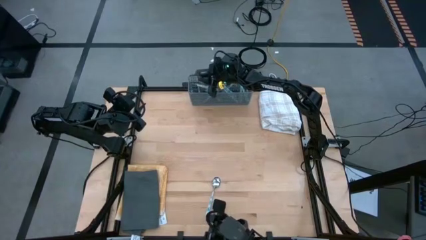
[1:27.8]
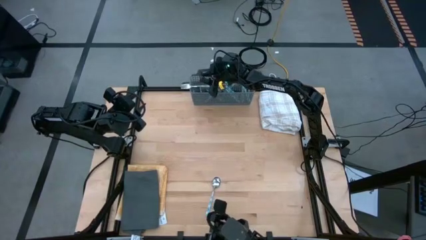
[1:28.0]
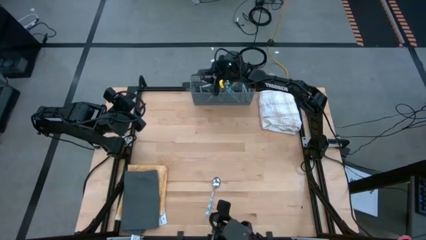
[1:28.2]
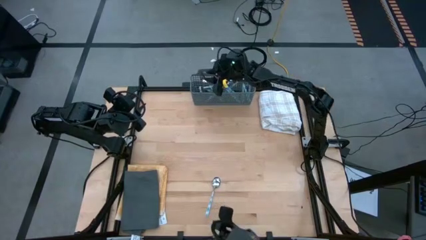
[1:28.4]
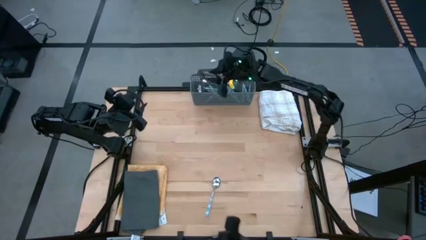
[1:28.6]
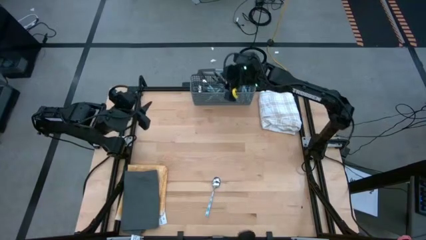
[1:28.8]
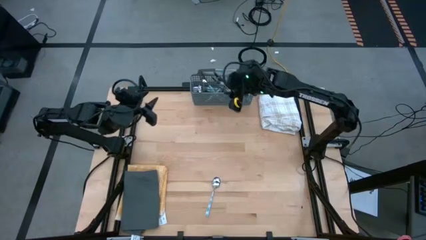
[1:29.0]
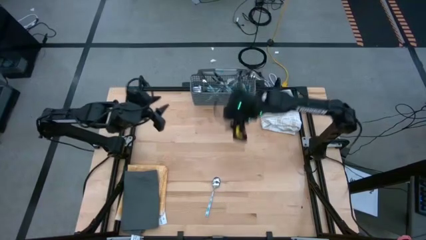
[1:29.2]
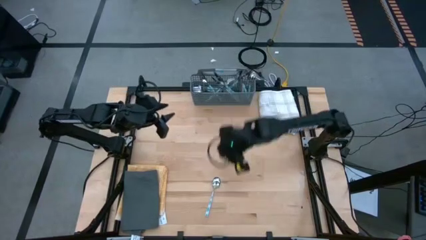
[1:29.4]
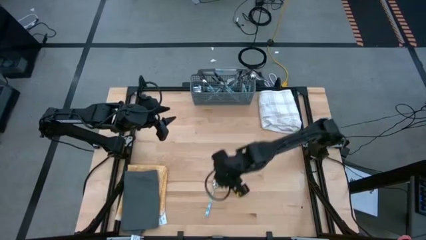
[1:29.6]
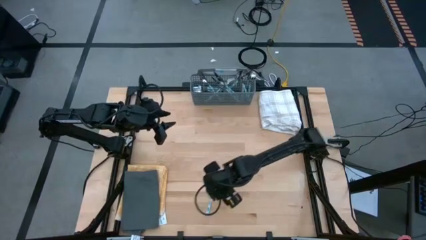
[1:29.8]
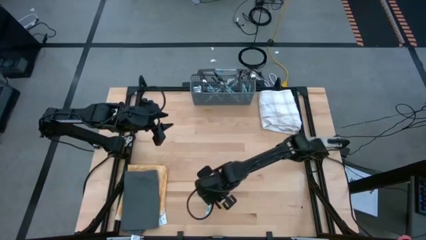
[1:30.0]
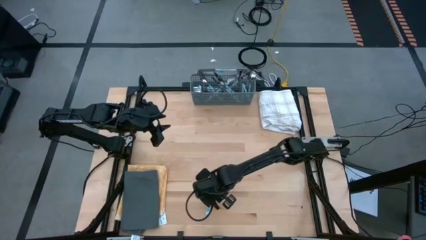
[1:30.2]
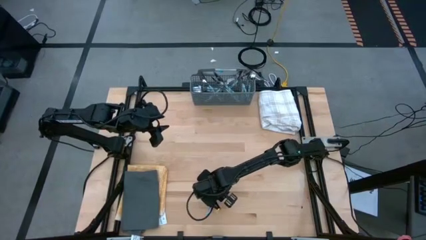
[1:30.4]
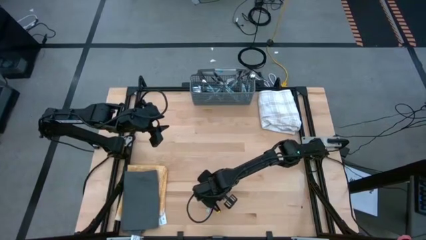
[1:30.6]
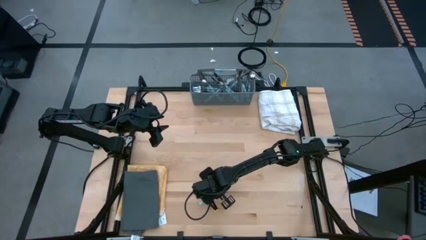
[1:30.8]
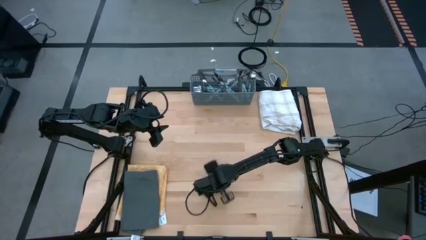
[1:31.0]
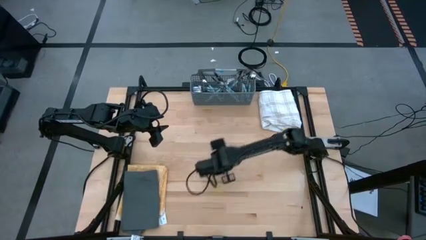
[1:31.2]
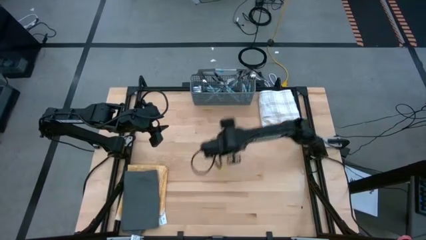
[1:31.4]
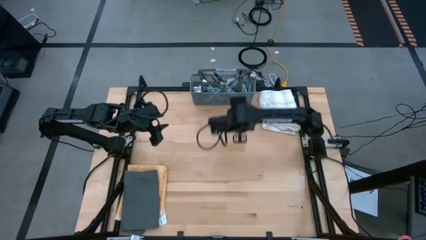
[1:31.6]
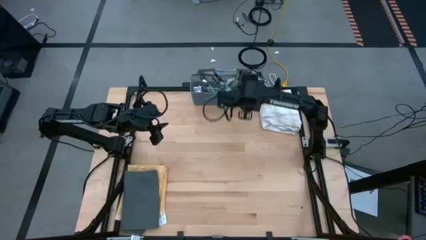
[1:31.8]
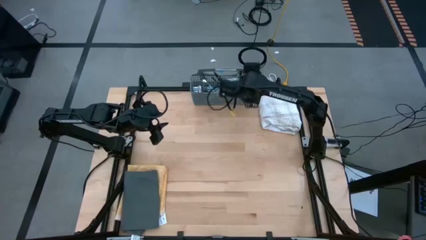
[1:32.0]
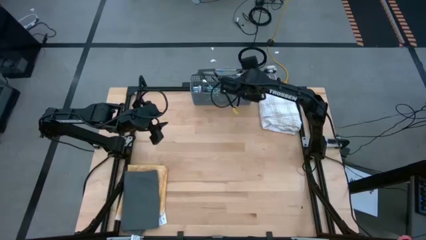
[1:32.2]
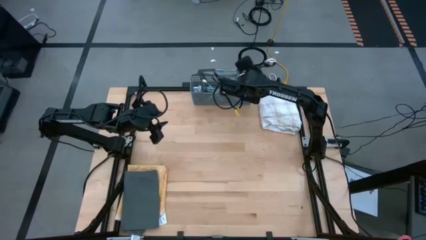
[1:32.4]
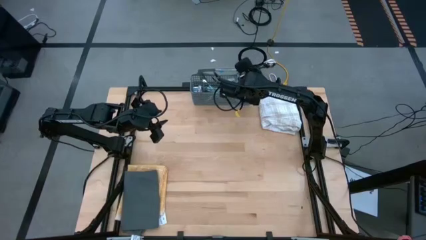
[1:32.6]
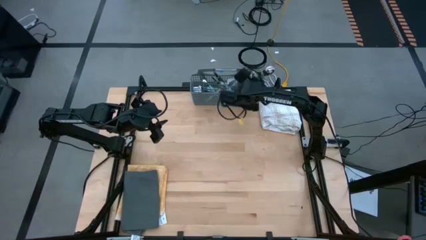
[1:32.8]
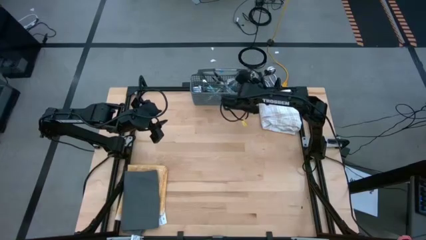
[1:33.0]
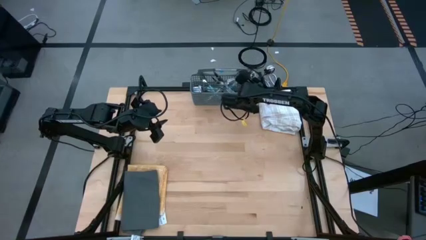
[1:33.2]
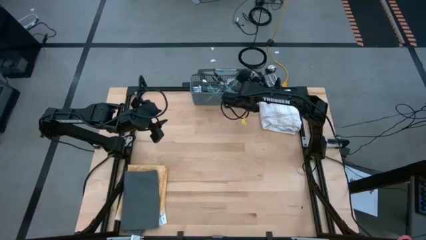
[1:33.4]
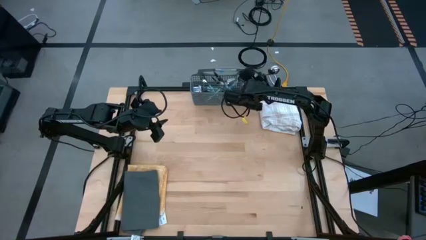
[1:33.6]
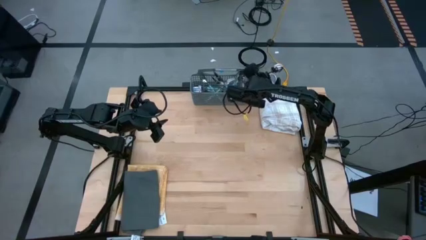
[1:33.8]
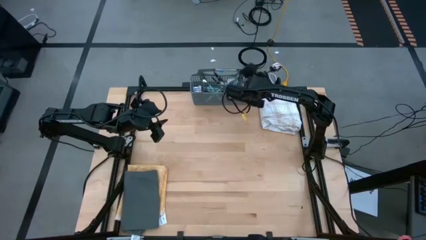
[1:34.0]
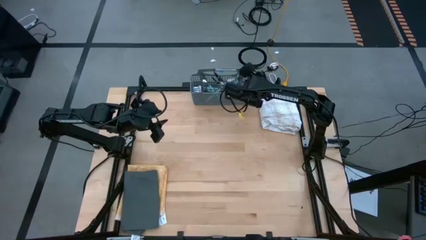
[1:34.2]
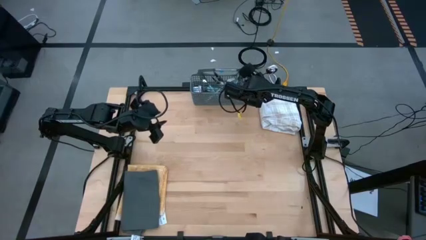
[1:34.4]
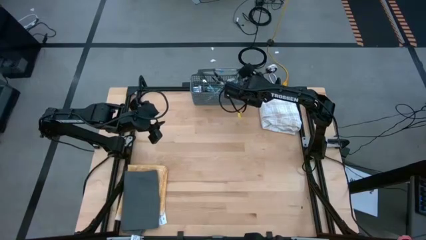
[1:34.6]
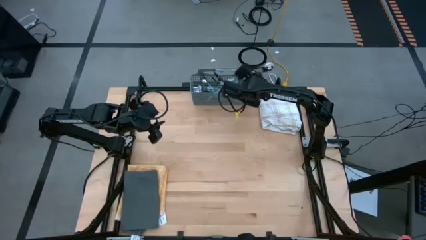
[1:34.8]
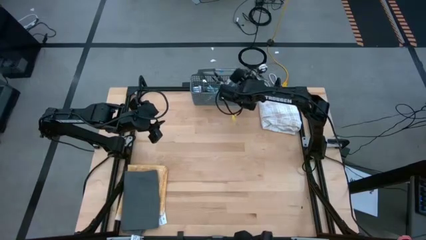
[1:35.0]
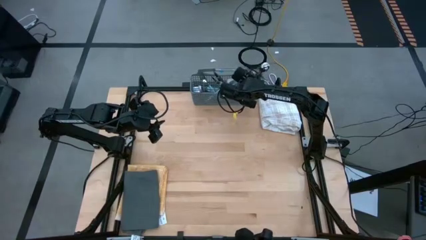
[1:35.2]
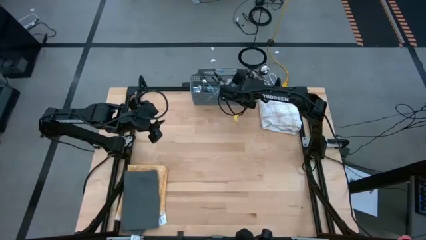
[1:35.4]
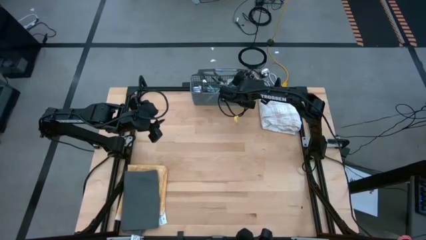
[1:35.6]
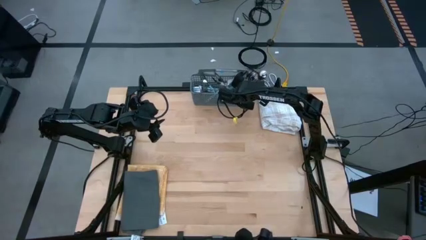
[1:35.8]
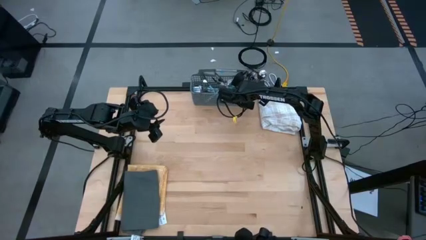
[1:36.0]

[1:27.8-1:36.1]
Task: Sort silverware
Put the blue spoon into the gray silverware rack

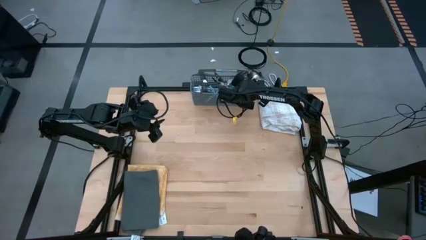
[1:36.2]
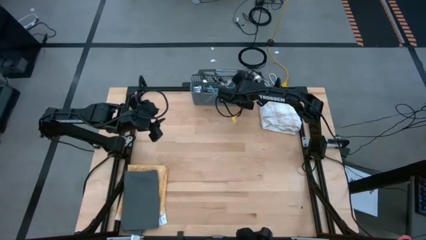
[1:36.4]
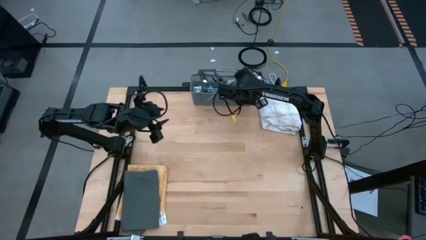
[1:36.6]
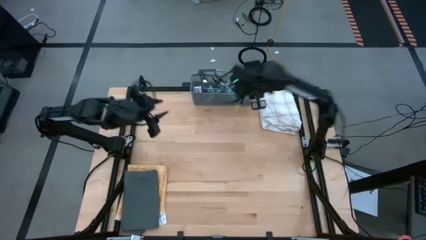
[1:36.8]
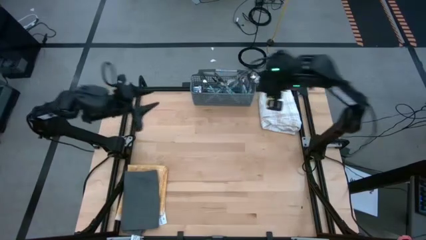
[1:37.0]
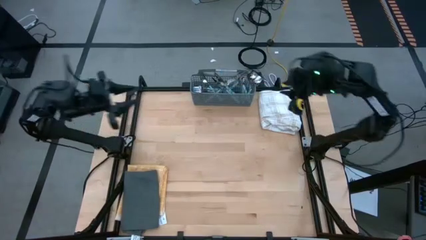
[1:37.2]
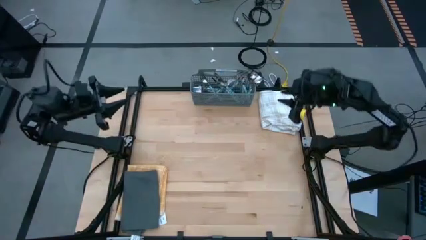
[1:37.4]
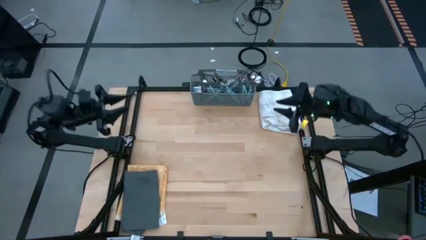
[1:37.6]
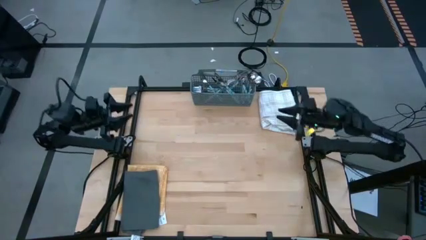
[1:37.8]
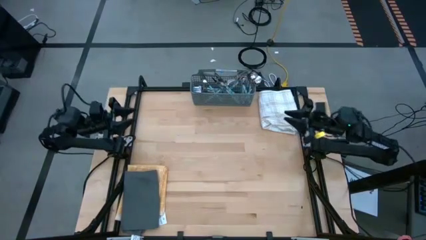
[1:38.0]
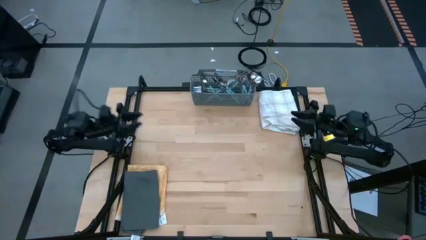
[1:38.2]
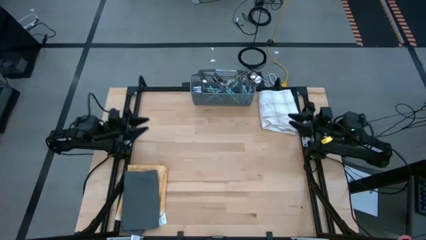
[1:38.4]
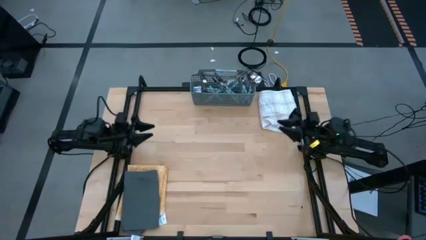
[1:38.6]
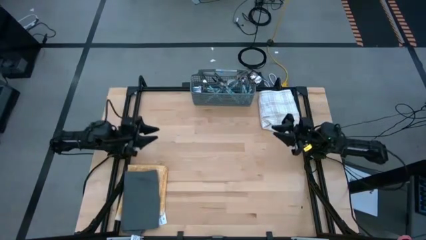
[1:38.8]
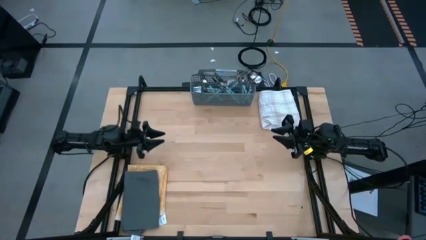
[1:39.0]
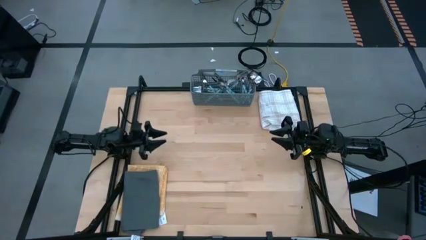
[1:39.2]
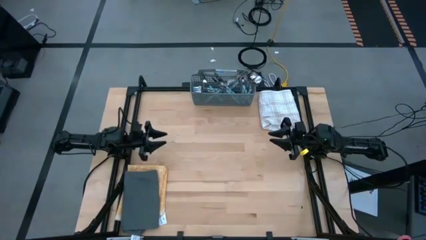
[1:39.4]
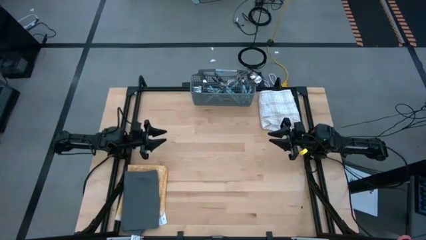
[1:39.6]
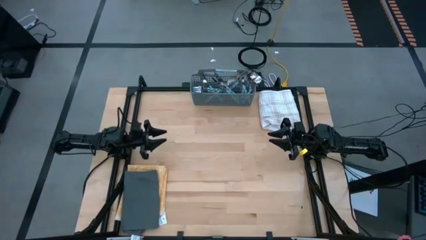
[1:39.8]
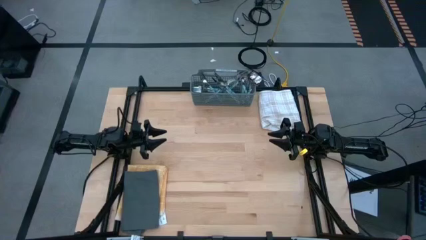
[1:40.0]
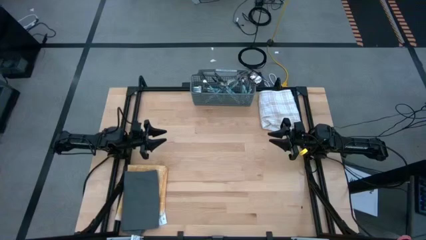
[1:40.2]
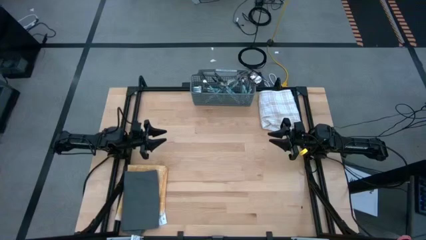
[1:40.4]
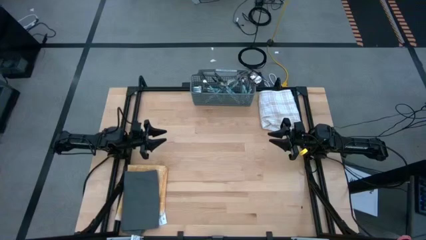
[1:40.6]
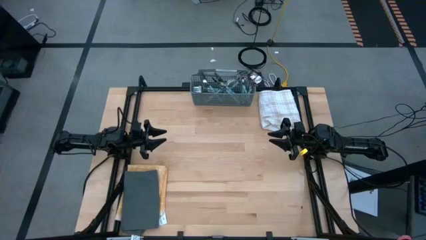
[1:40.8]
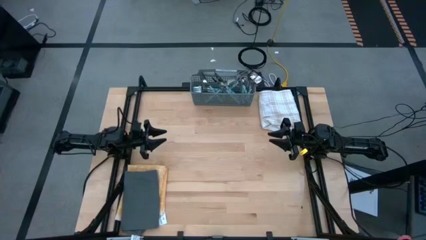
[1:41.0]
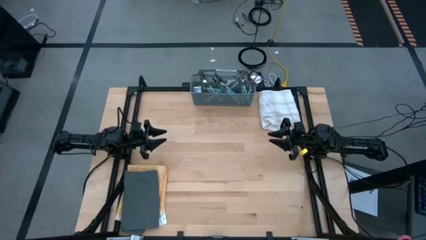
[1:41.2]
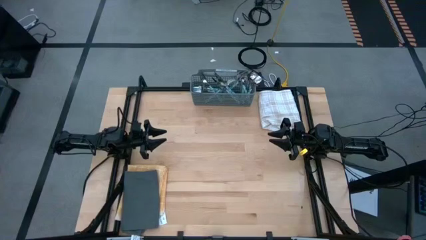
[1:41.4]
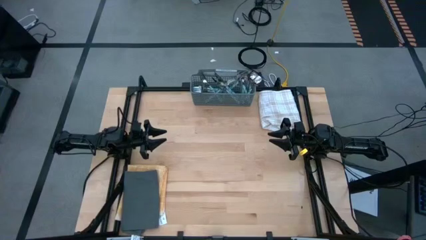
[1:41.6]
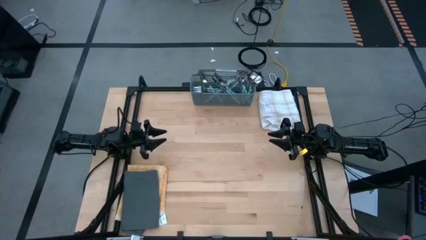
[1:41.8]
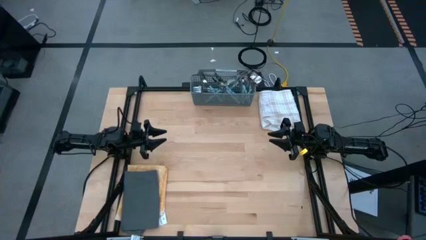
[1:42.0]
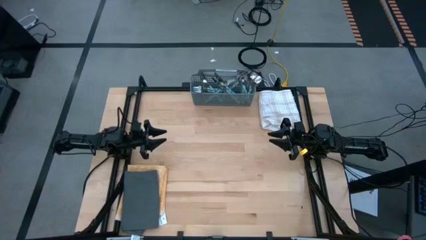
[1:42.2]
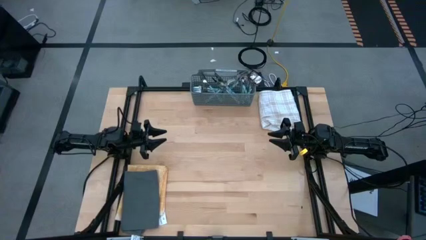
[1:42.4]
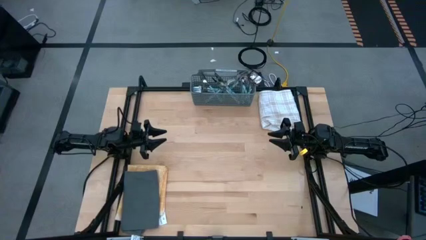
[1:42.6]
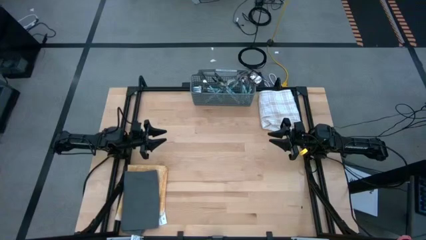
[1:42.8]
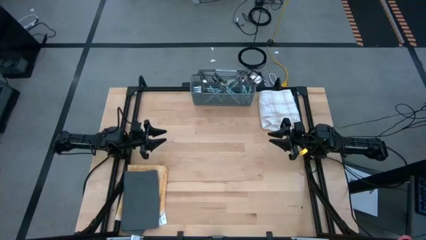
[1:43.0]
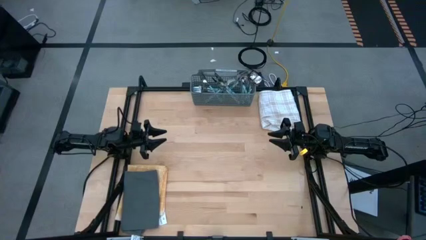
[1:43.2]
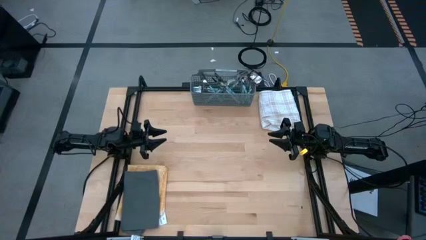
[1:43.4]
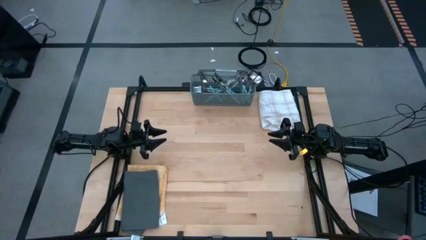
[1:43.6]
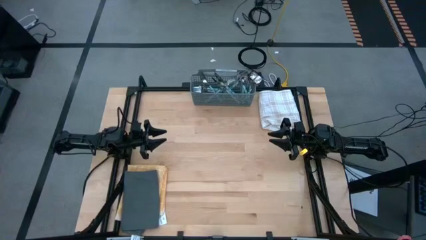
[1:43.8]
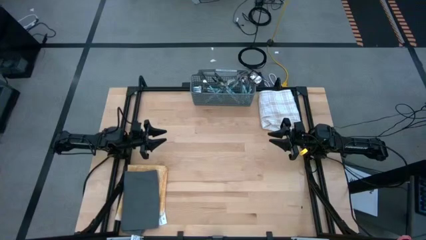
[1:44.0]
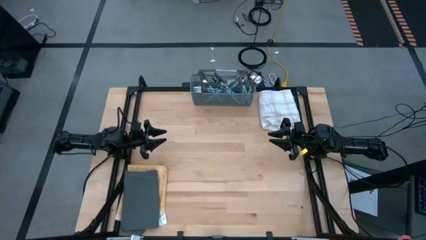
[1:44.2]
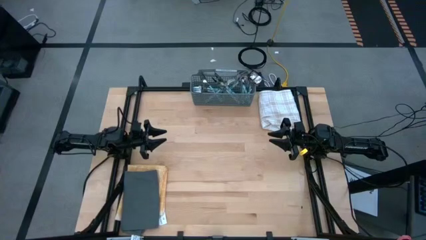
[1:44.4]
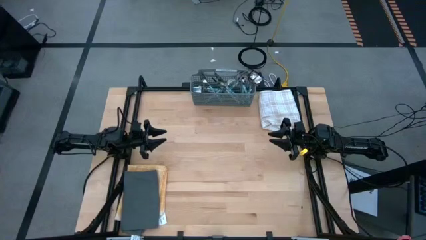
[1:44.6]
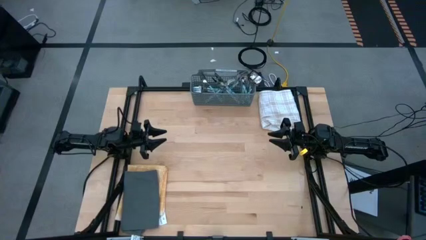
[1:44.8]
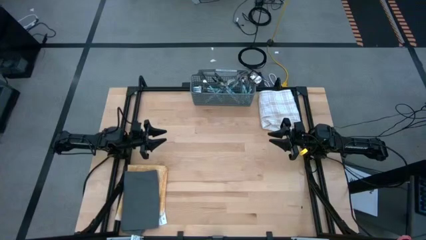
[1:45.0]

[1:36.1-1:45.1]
Return to Home Position
